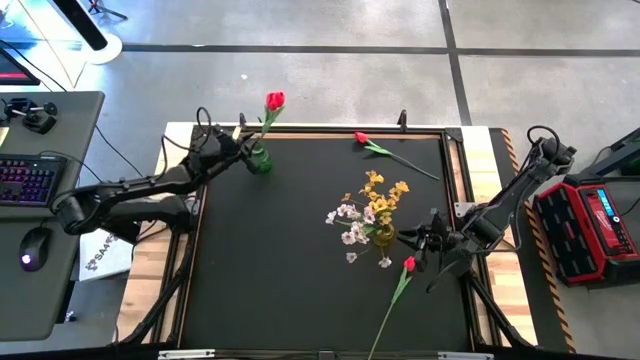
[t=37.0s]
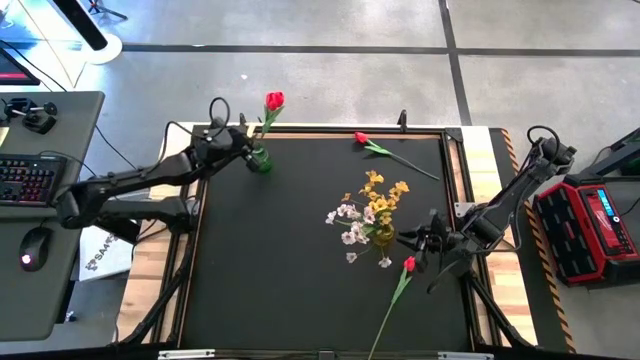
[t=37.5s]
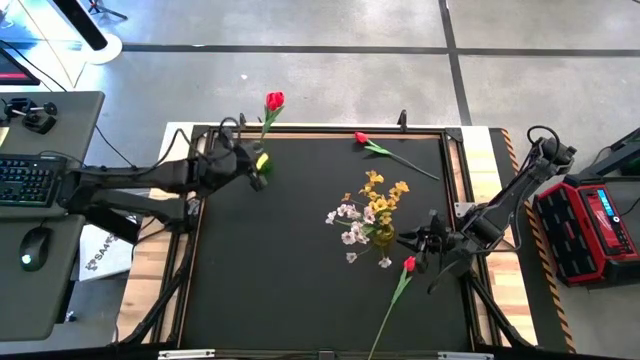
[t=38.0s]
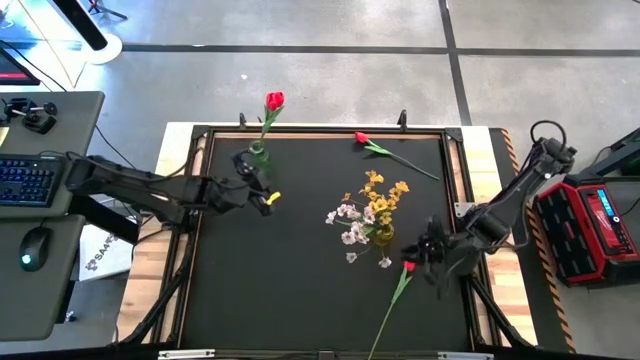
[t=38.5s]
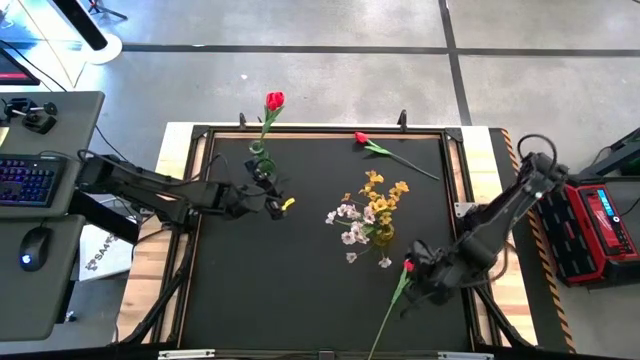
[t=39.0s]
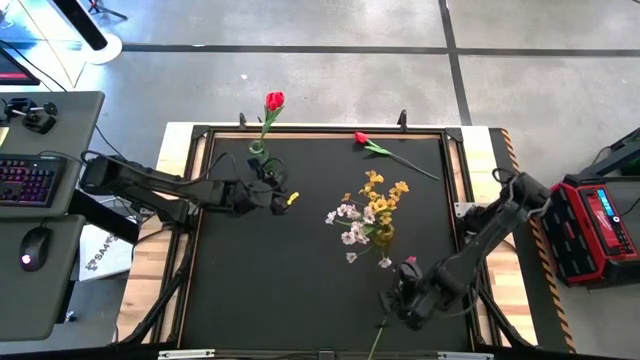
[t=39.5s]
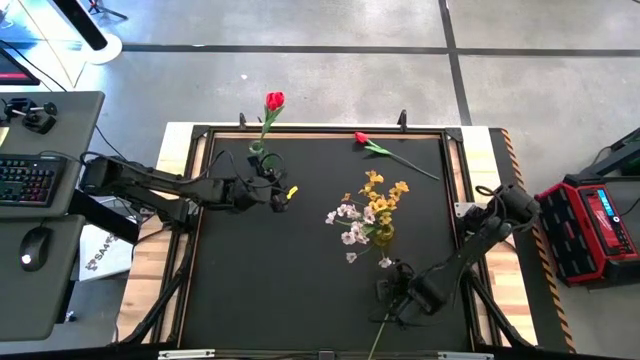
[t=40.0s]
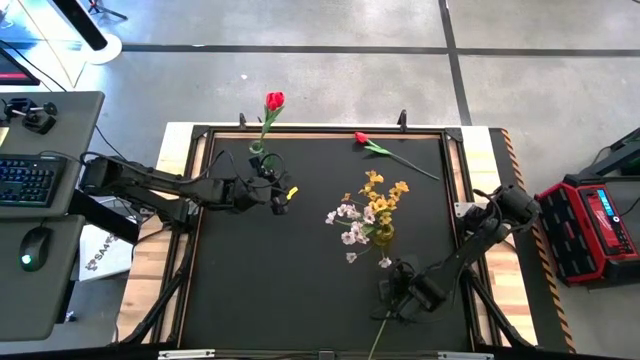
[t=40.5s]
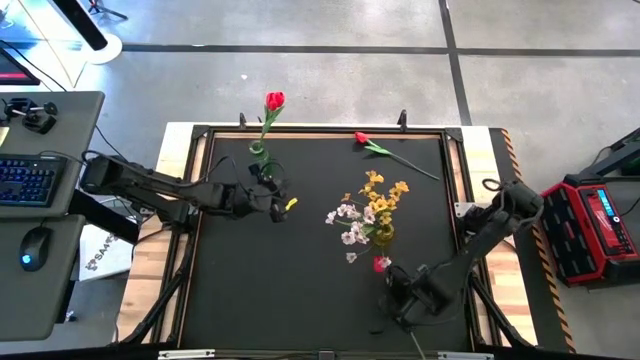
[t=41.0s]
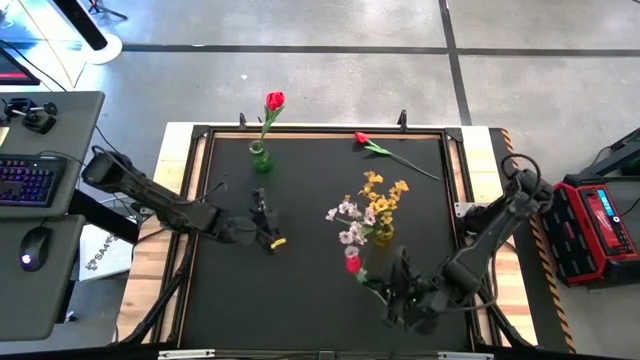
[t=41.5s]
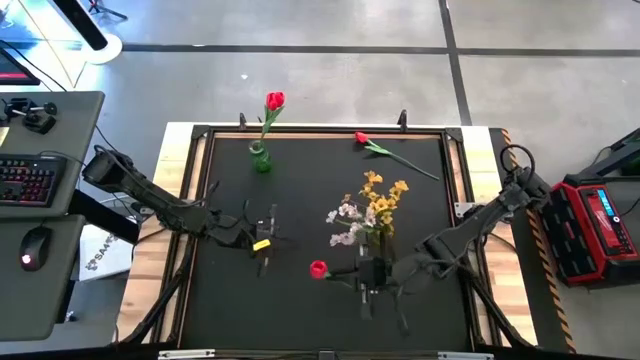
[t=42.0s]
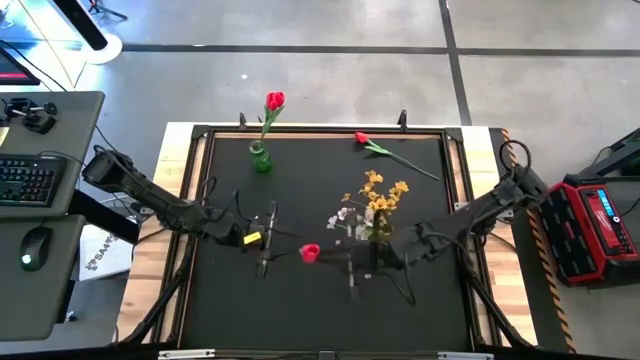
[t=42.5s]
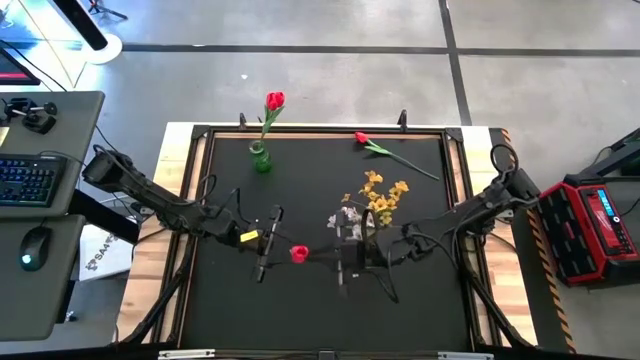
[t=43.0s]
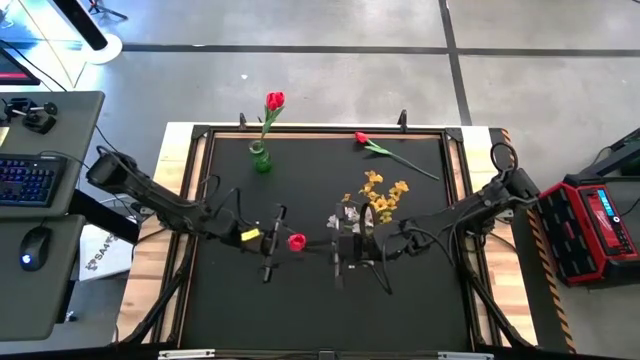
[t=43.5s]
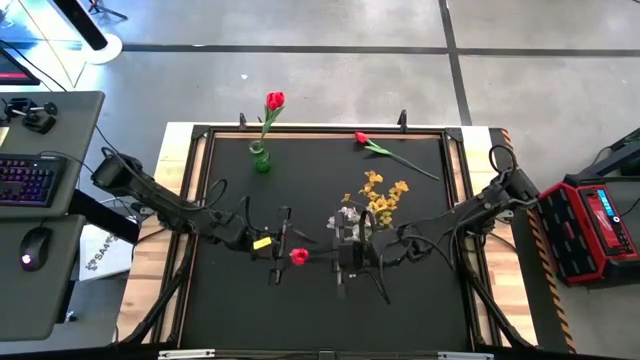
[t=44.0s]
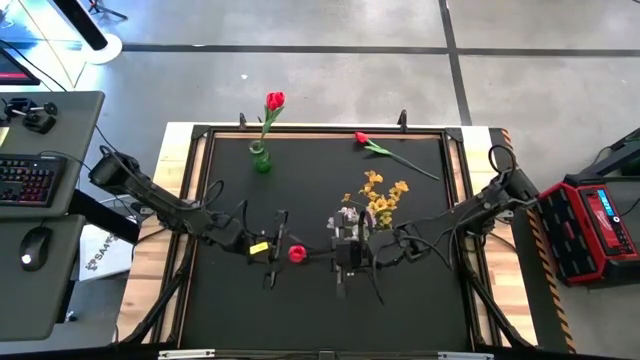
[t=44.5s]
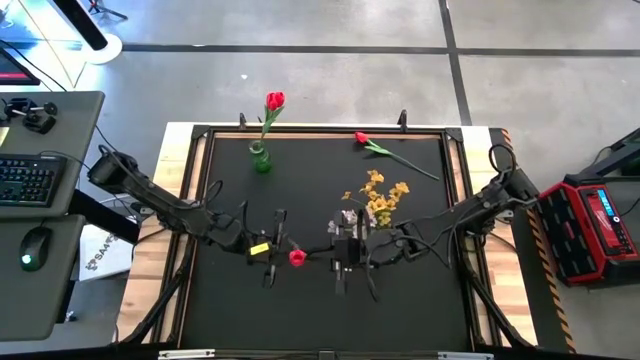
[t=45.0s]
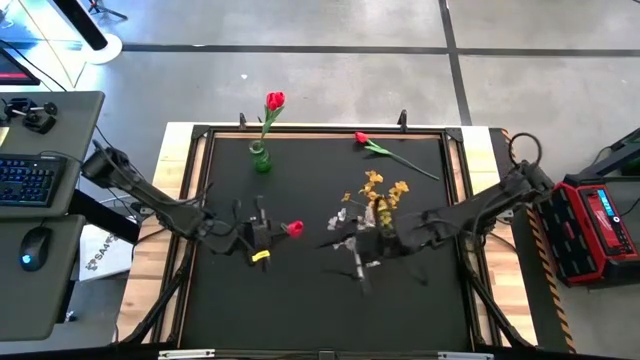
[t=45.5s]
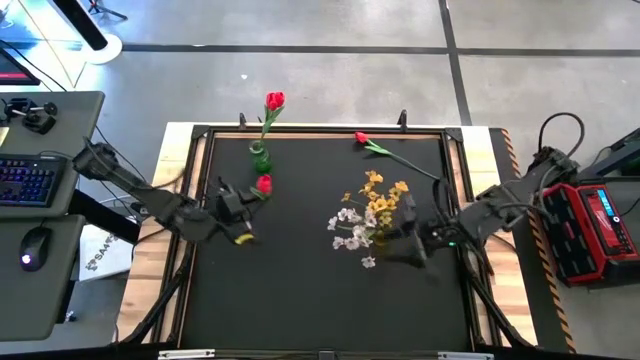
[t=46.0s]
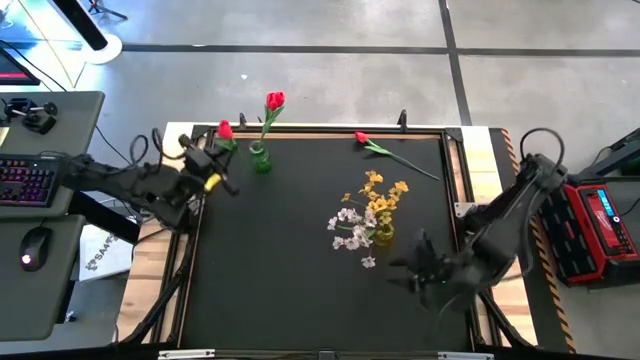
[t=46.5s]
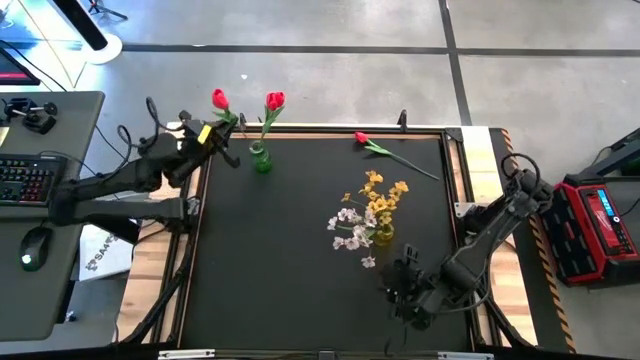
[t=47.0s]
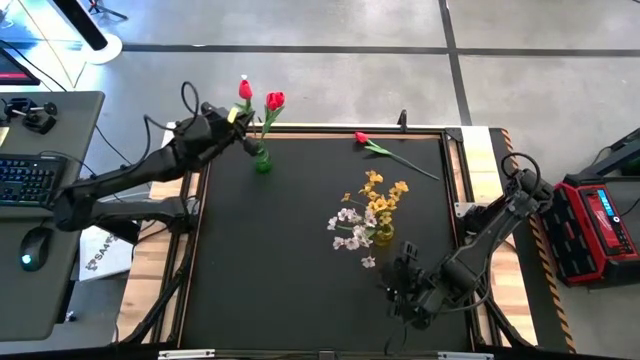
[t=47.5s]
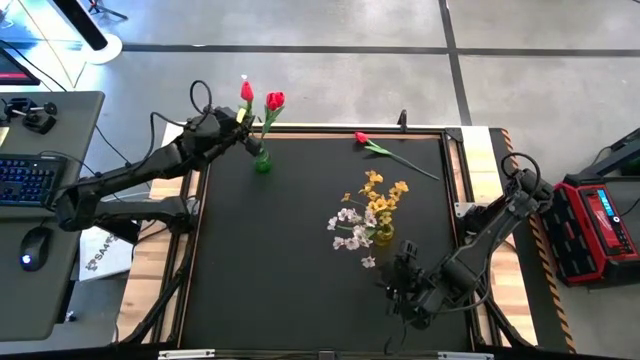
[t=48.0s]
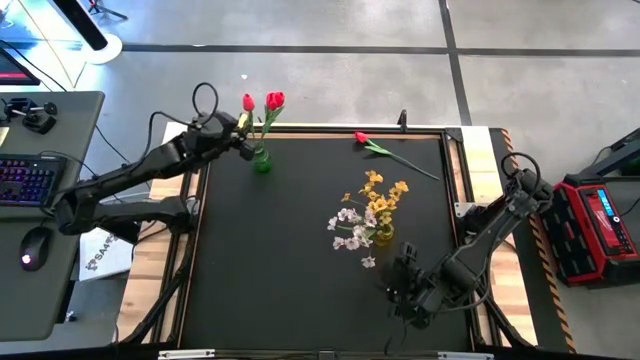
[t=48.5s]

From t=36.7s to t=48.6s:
Task: Sort flowers into vase by color
Put the bottom red tulip into the green vase

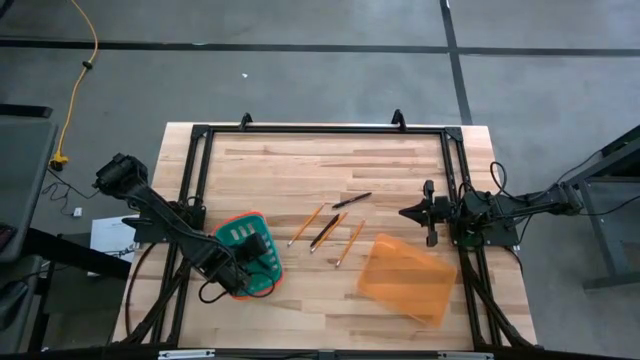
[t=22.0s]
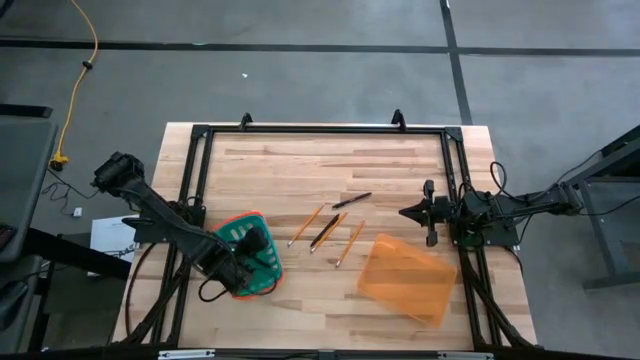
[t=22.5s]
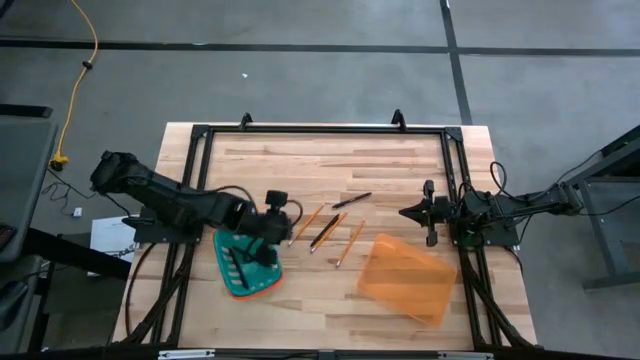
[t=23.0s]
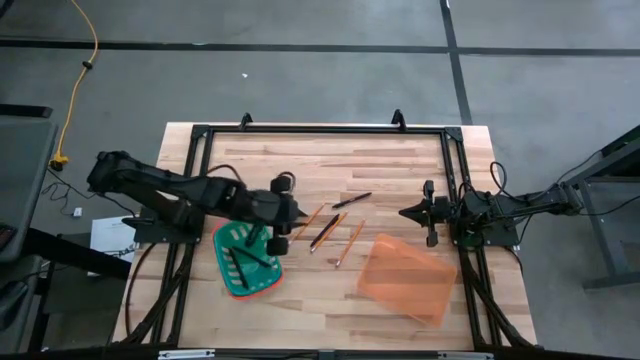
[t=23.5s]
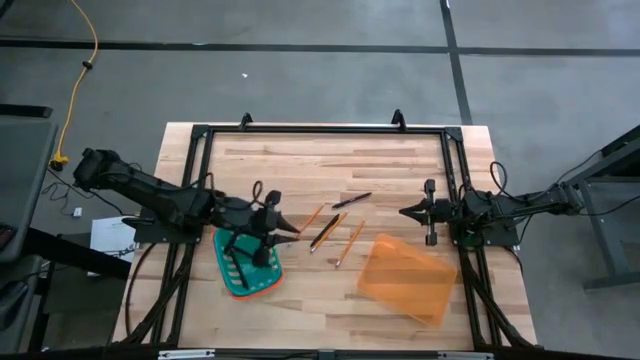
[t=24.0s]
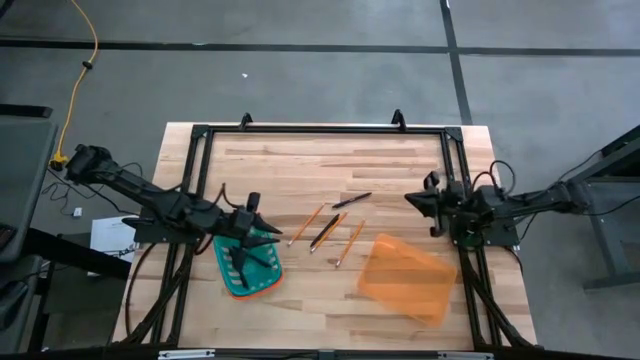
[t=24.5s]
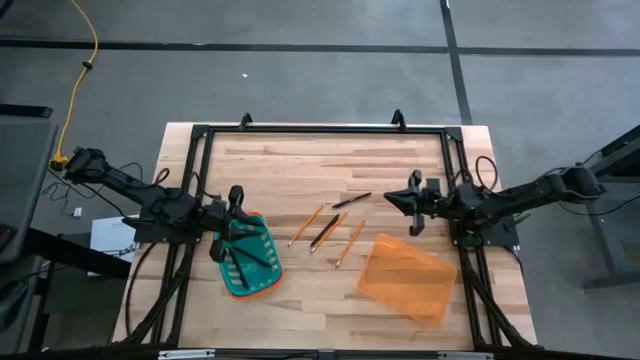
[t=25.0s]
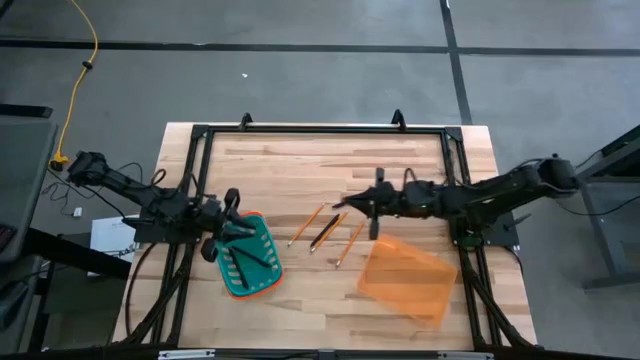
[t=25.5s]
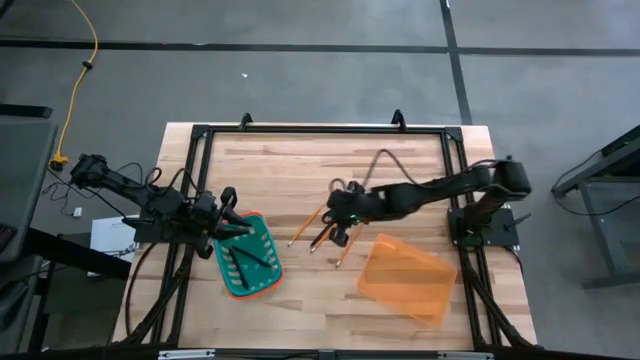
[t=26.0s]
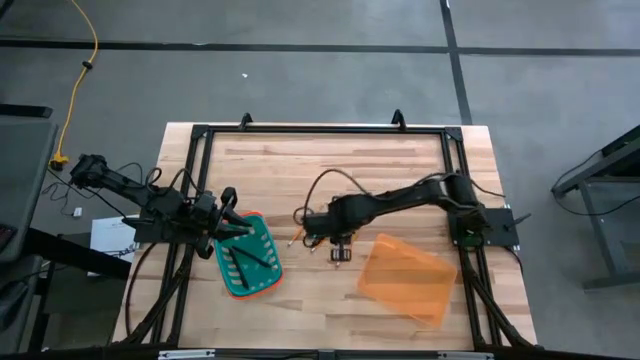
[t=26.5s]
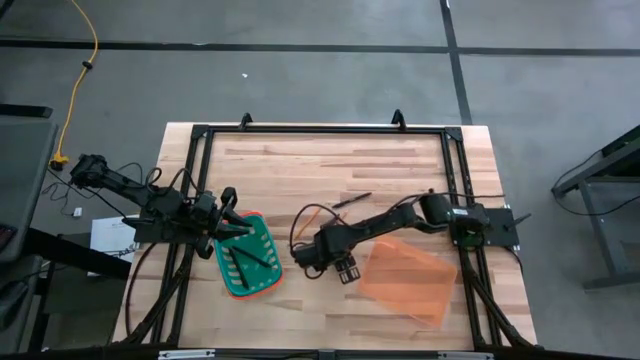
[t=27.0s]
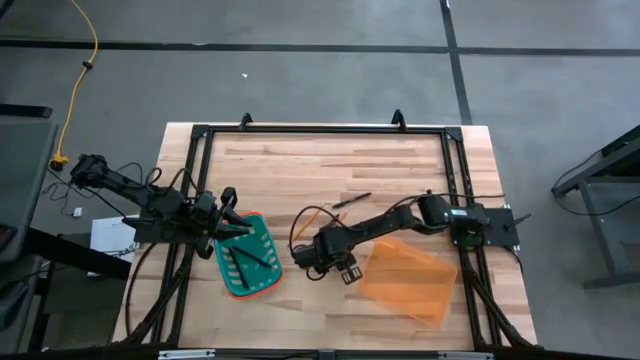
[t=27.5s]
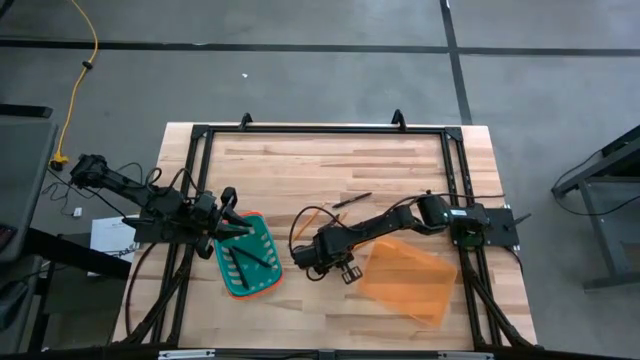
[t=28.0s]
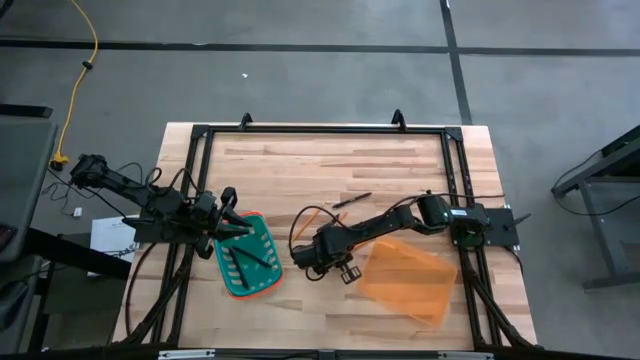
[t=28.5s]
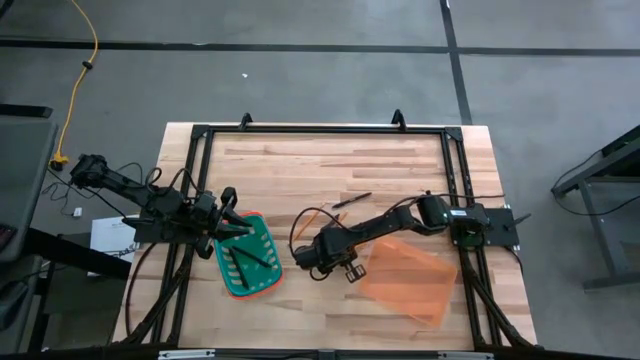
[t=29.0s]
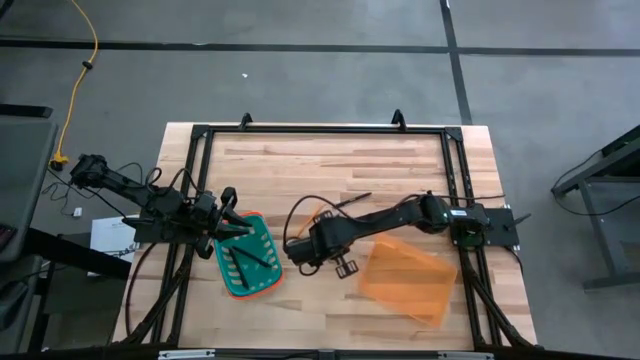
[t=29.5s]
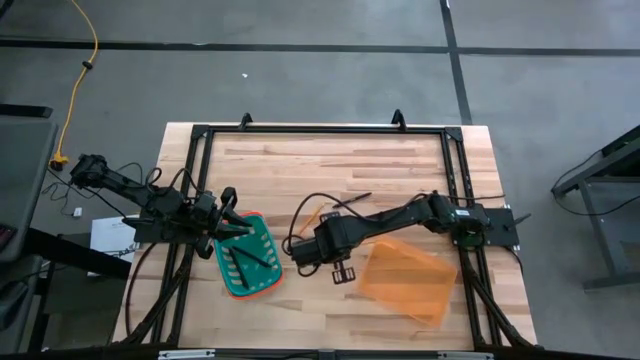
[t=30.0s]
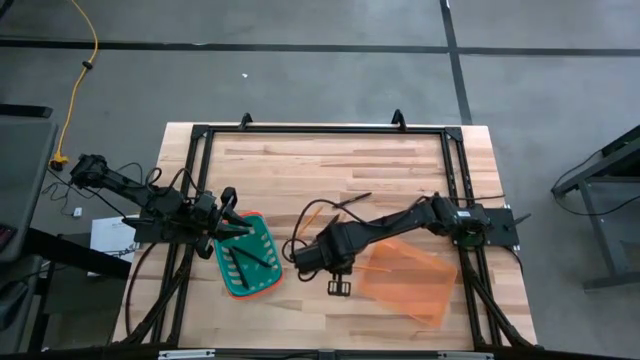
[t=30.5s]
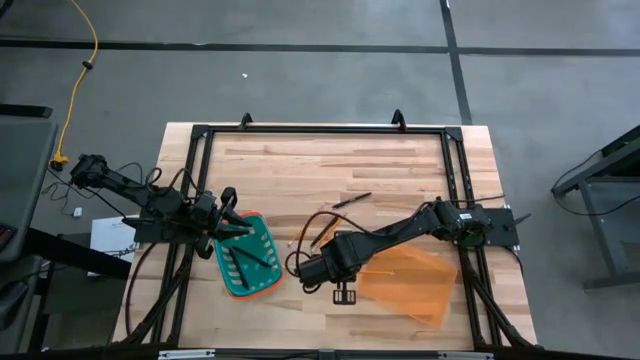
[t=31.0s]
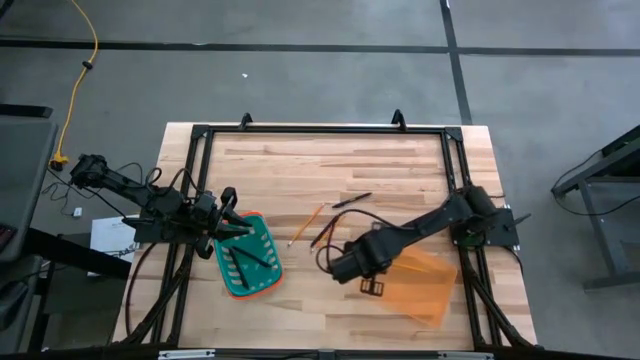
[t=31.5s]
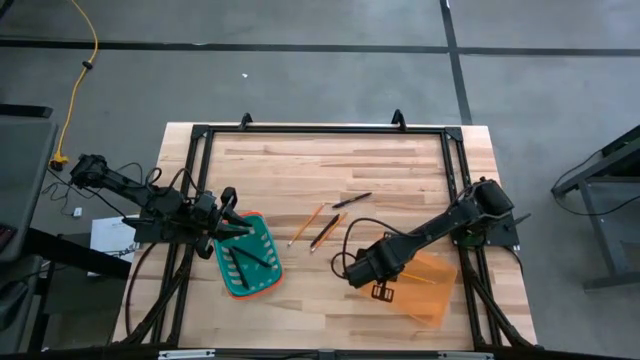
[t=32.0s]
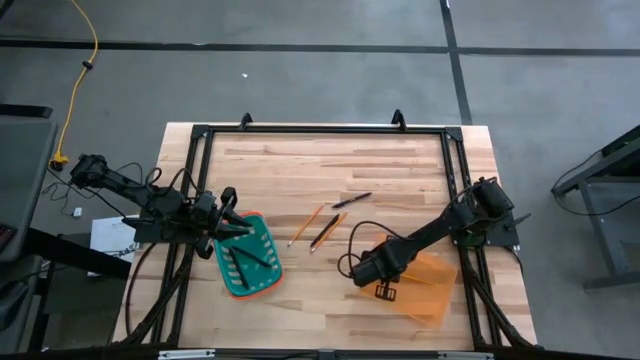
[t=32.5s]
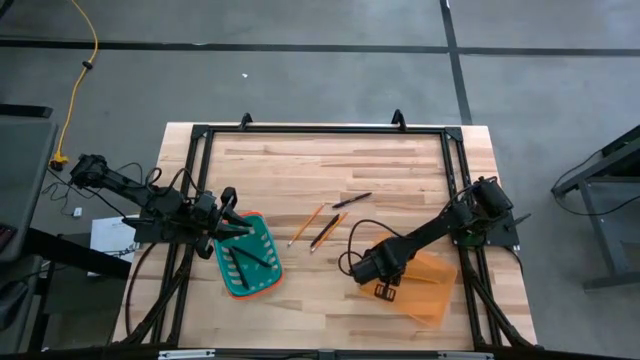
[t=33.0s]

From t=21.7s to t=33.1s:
Task: Sort pens & pencils
Put the pencil into the orange bin
